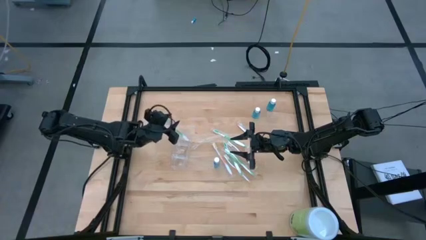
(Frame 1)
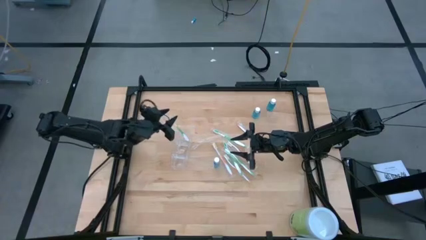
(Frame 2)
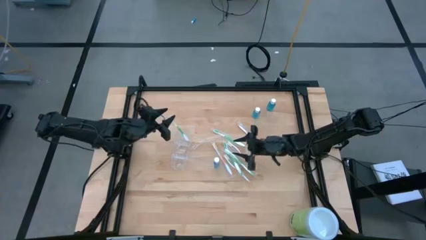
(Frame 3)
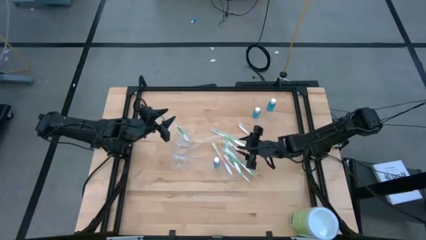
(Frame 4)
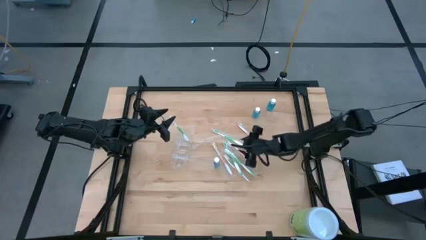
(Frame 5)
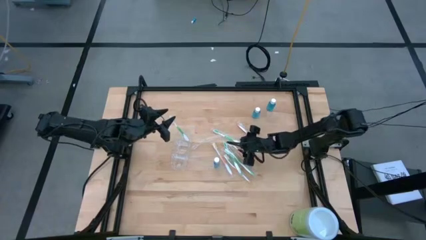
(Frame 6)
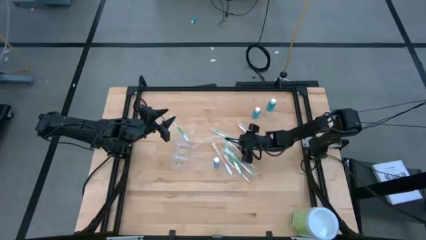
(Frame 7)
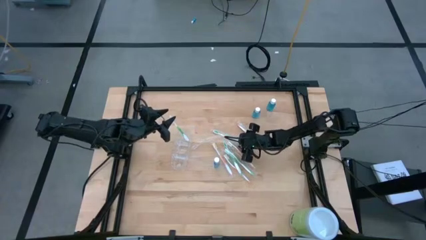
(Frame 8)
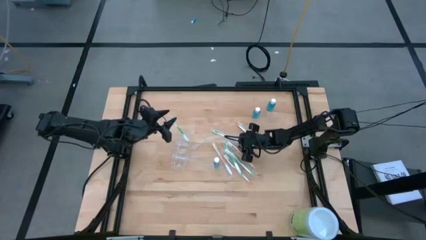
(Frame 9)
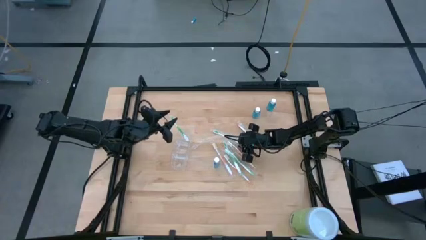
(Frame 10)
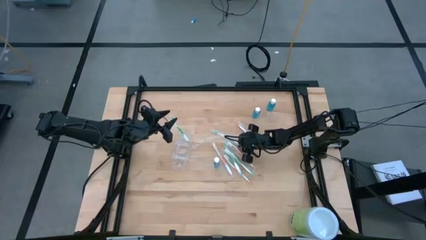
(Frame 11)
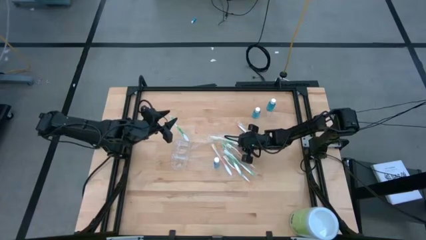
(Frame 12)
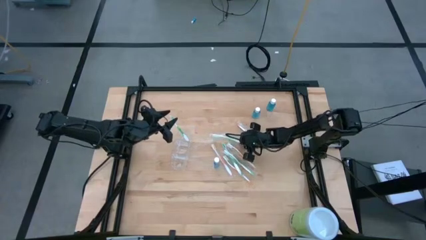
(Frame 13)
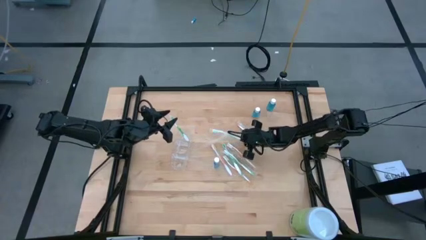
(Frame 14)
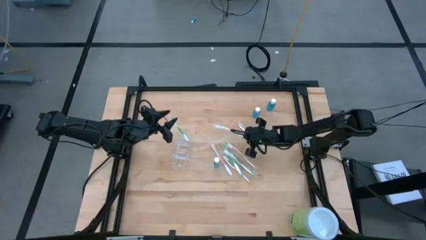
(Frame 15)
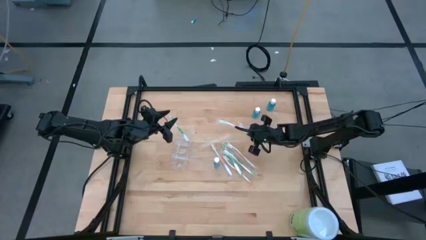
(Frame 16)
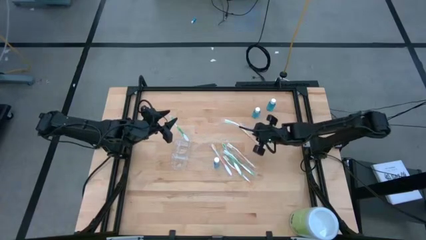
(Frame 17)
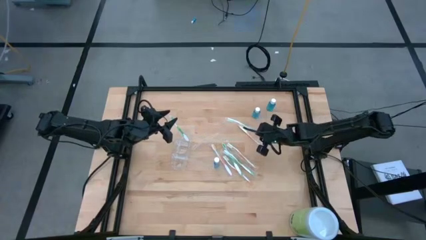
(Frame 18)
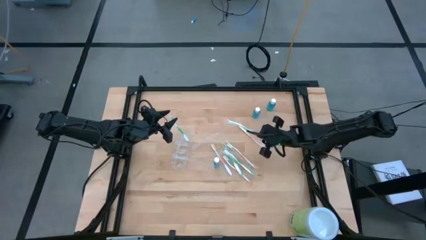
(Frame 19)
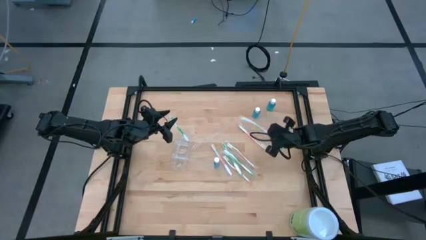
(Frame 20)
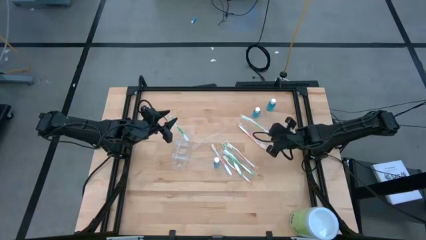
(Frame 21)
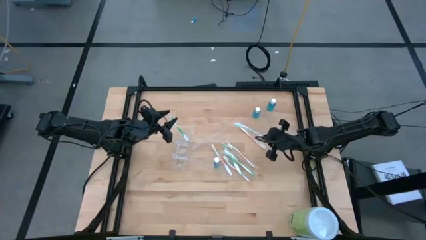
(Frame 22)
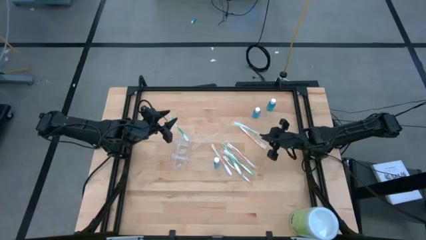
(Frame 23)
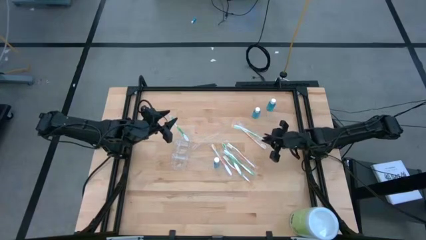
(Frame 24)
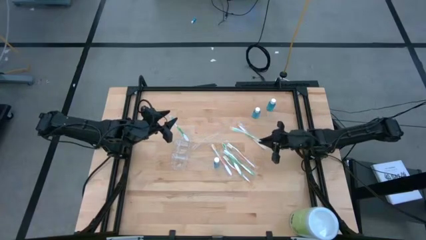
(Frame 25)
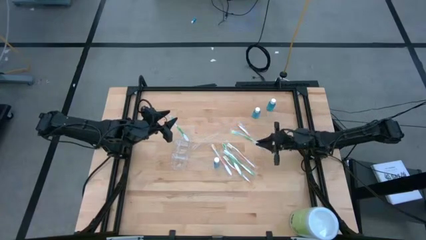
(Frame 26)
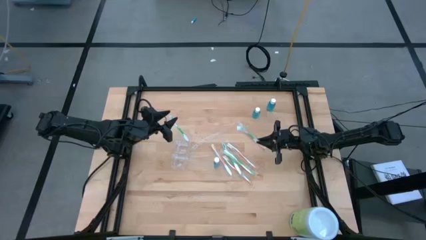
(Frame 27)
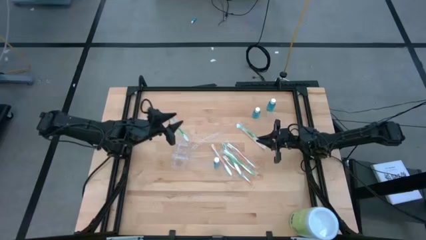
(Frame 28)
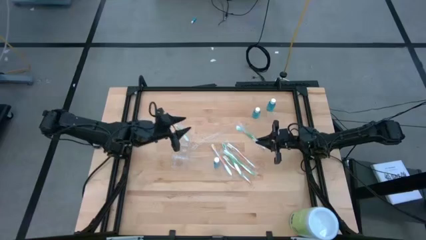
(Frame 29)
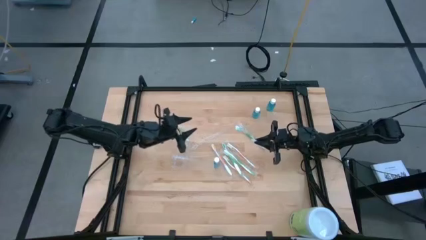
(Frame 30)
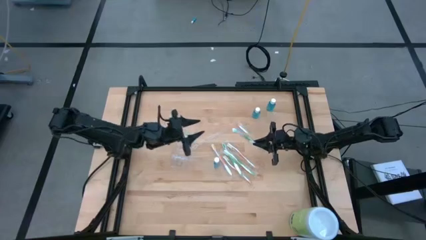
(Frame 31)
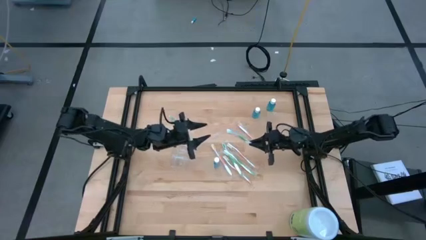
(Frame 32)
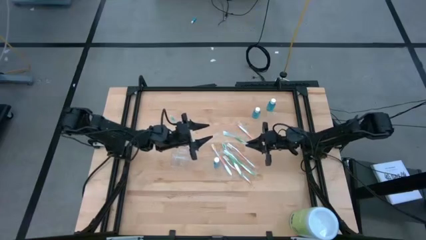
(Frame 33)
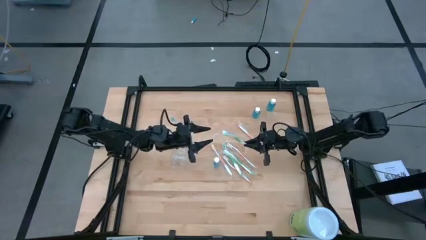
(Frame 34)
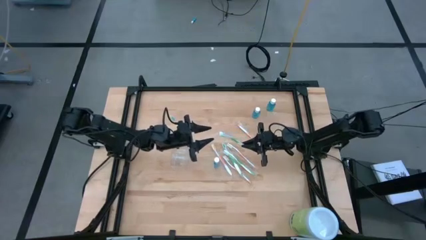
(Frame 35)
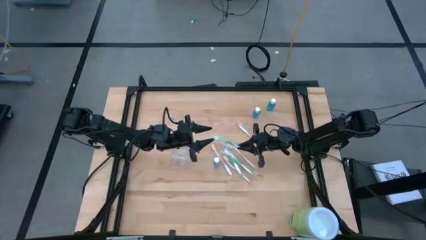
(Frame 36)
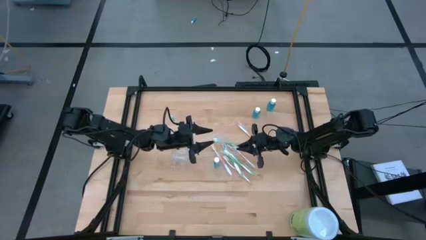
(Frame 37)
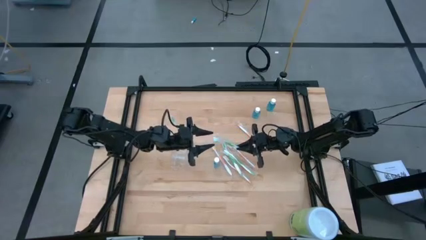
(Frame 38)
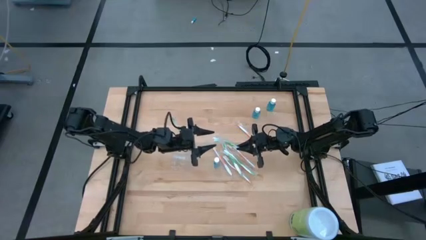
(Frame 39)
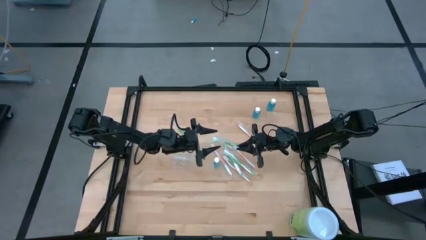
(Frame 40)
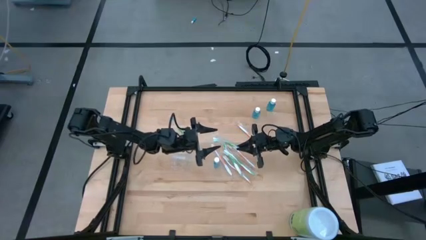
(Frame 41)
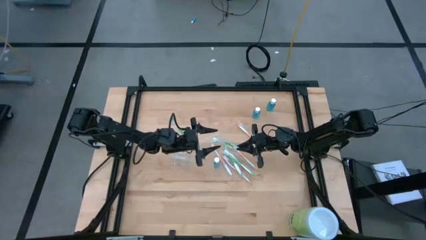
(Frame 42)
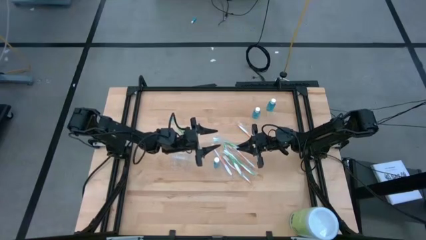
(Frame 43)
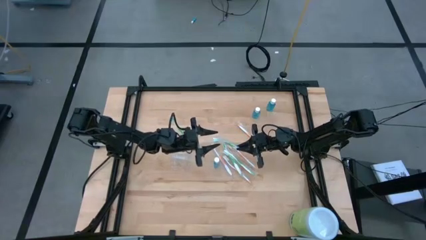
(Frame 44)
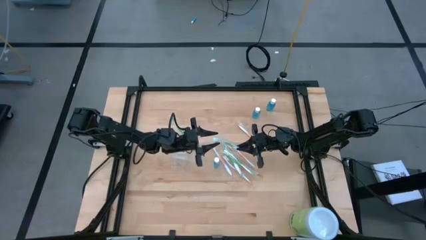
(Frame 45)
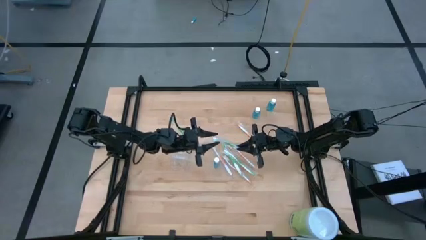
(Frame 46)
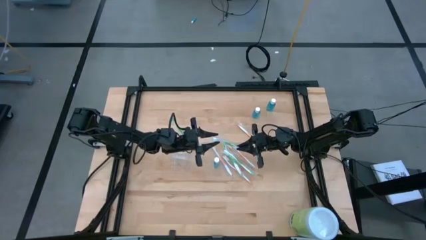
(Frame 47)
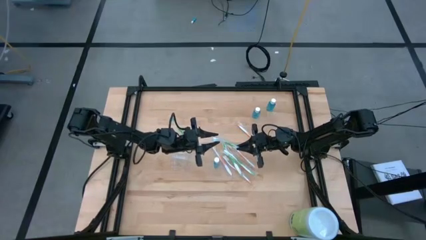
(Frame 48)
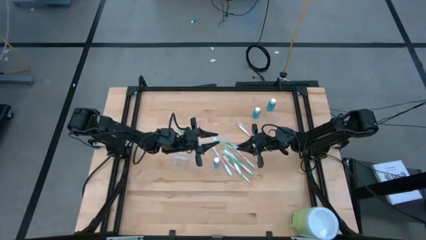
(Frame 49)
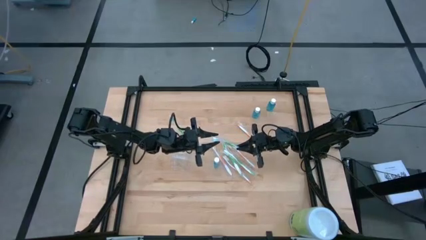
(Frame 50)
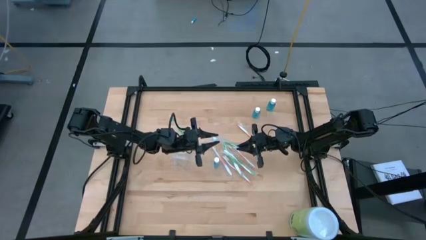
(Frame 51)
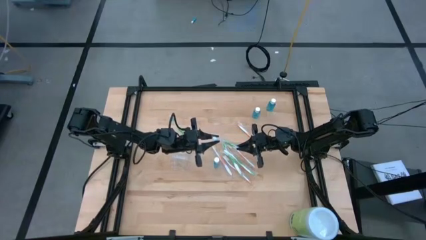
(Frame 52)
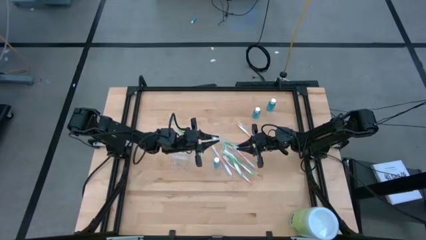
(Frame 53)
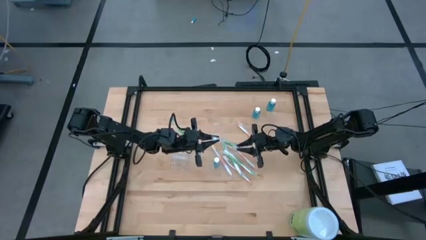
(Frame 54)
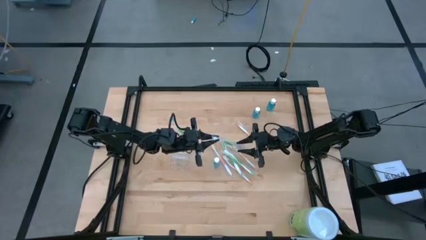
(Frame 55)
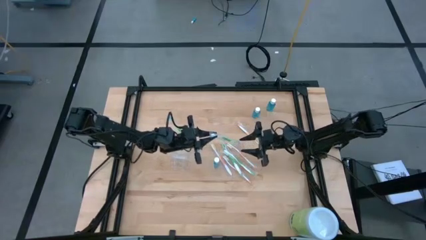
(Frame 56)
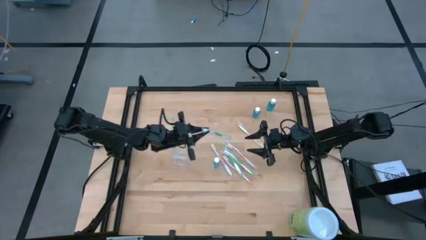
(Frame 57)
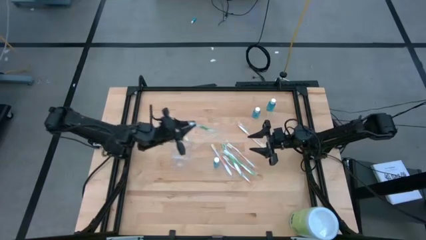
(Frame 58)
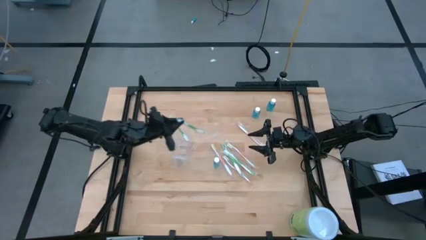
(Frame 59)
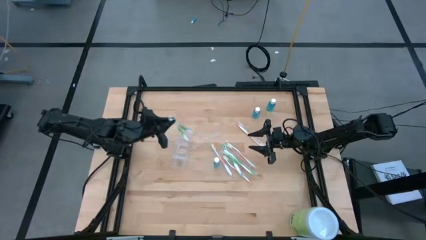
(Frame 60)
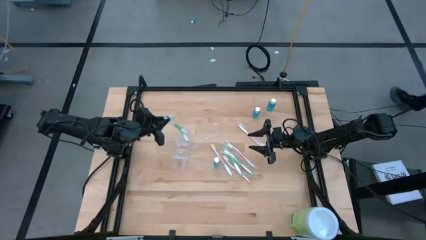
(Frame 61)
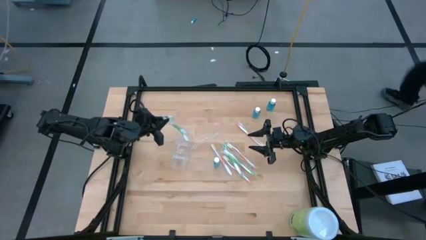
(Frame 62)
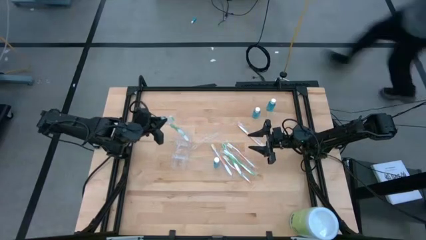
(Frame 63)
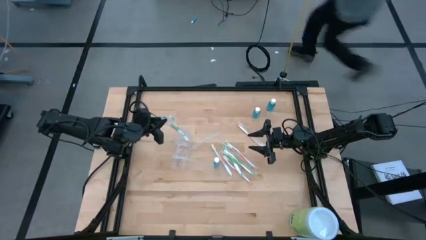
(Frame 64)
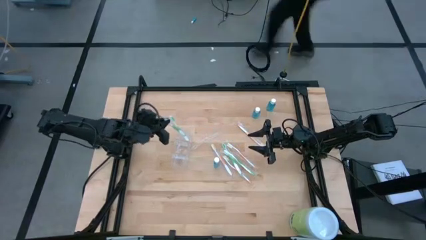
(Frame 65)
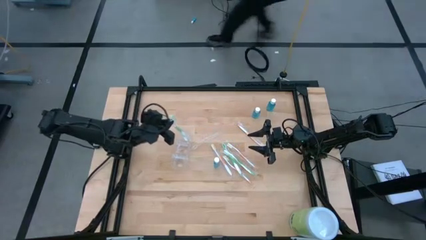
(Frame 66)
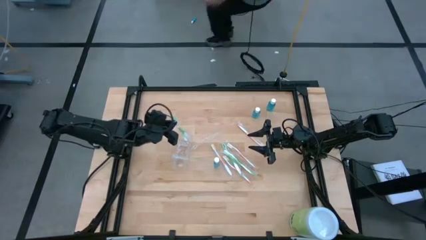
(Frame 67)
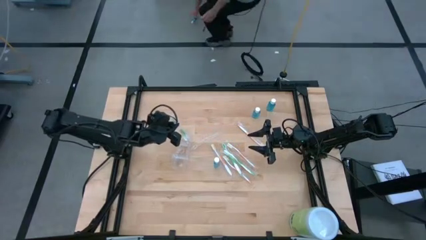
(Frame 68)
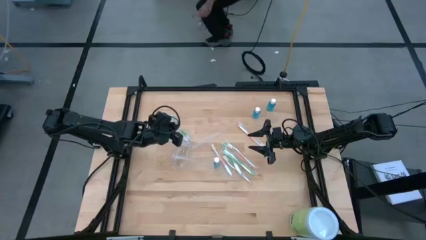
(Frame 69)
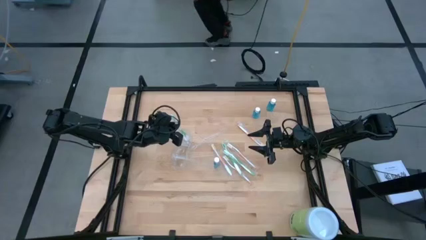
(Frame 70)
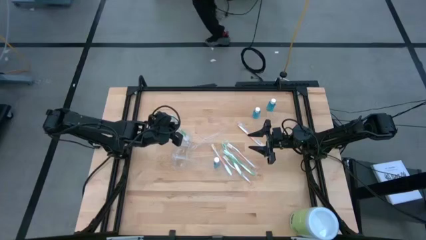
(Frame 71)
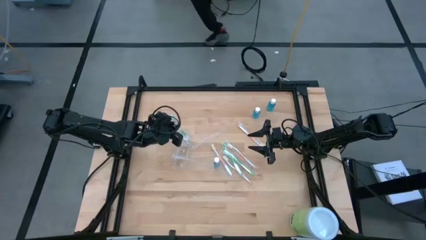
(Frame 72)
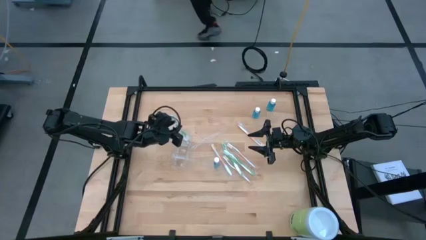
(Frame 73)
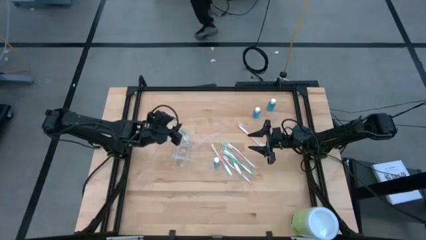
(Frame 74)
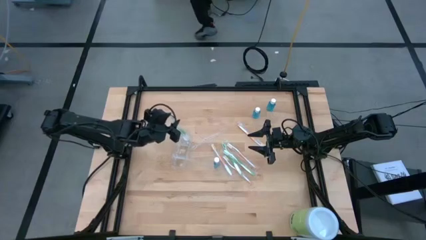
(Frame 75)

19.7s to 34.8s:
Task: Pick & Place toothbrushing station
Put the green toothbrush into the top section of the transparent organizer

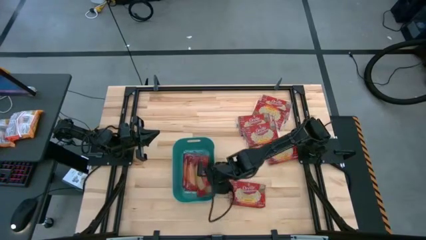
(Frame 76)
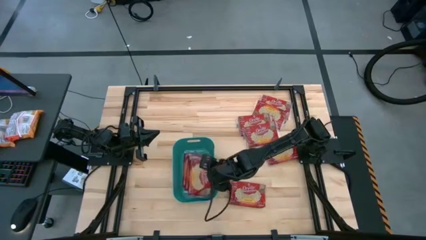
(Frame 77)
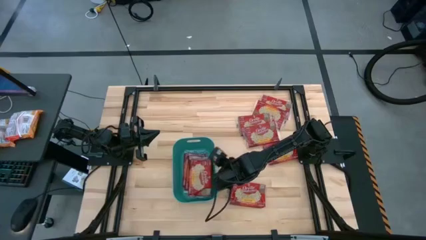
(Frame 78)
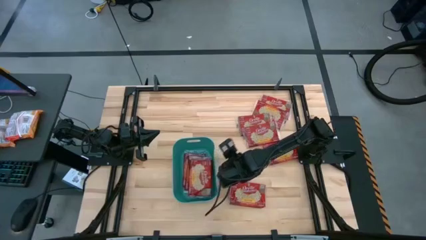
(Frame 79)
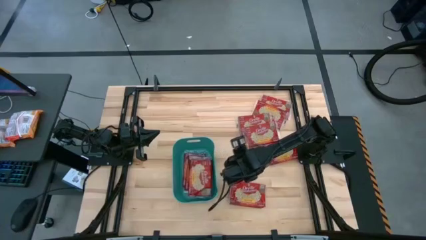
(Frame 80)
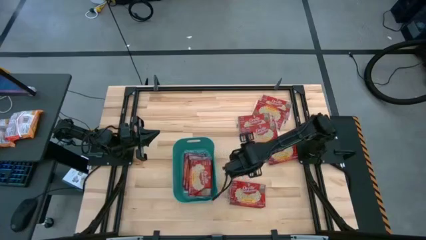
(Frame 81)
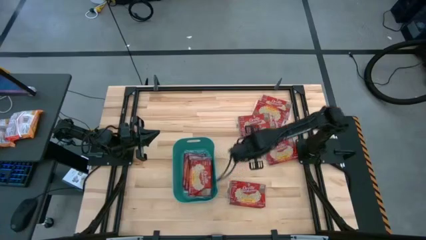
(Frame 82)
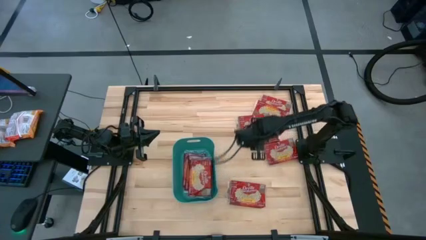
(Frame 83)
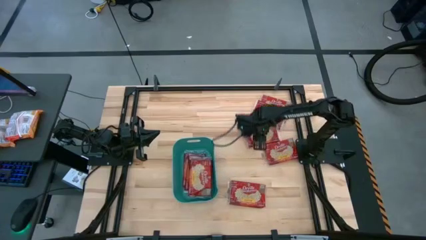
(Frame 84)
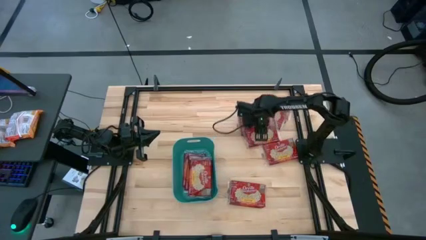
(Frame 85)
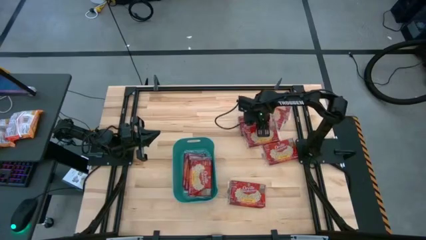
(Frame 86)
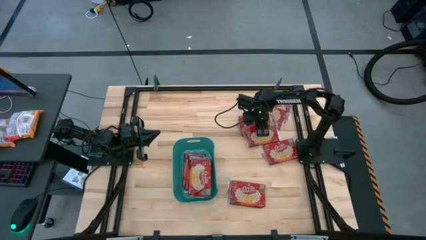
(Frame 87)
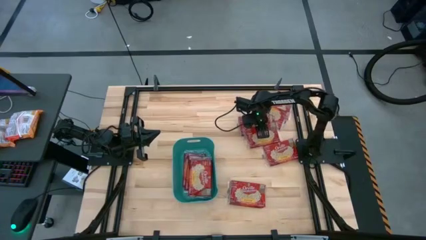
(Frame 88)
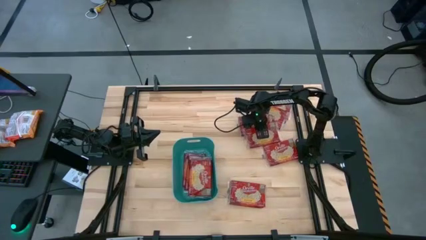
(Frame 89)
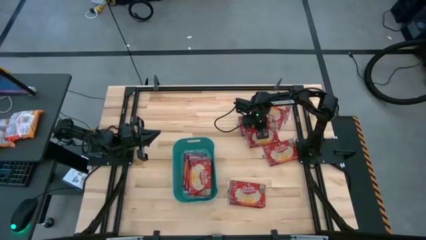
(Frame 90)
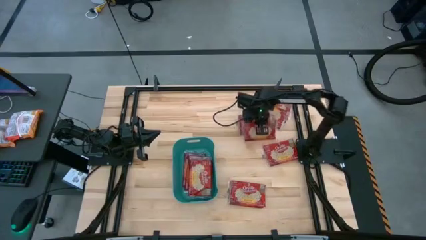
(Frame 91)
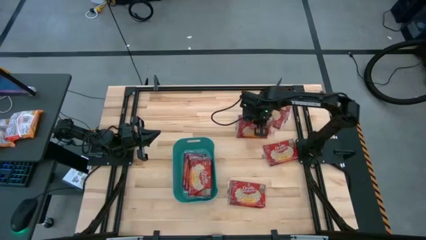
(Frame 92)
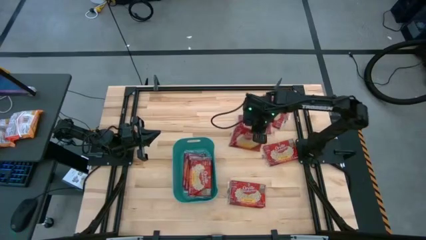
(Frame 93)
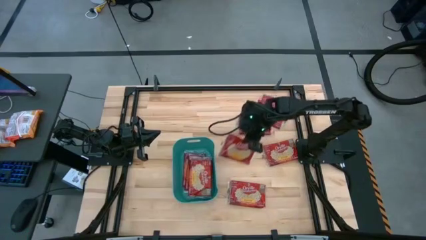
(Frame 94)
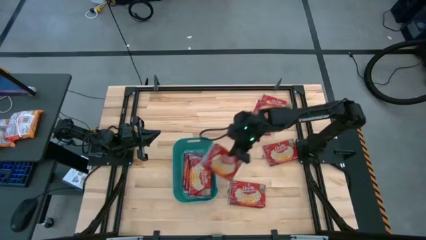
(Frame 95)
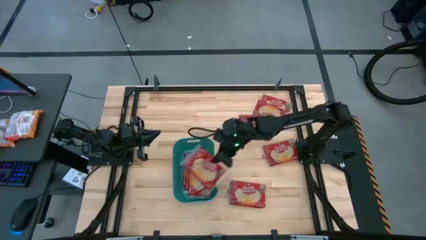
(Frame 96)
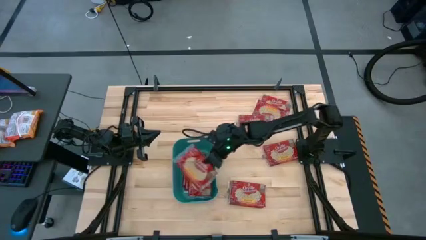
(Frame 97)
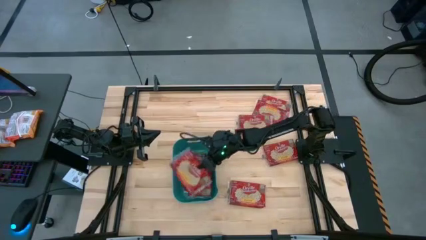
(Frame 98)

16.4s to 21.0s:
Task: Sort popcorn bags into baskets
Put the red popcorn bag into the green bin
